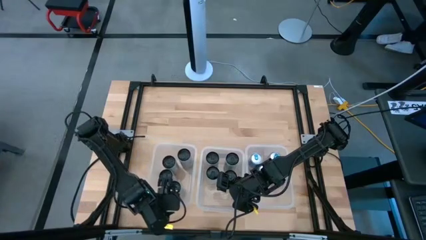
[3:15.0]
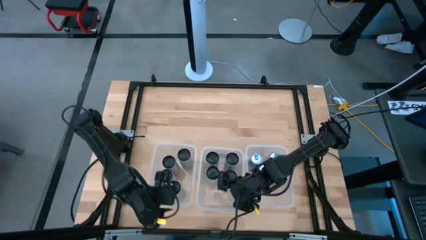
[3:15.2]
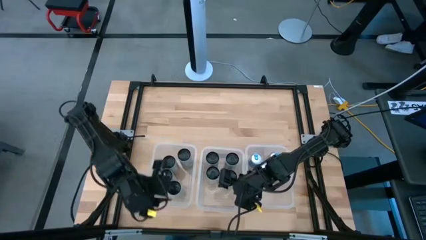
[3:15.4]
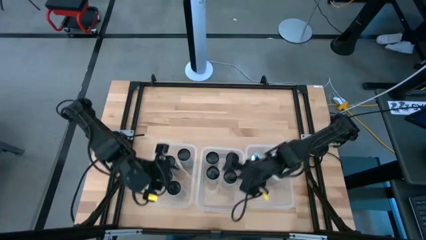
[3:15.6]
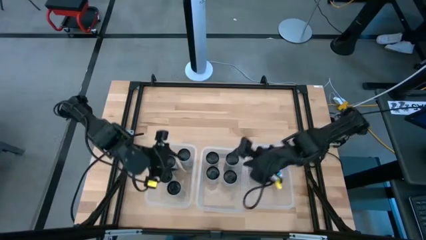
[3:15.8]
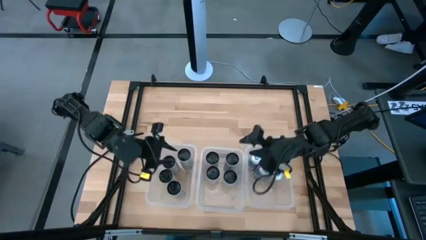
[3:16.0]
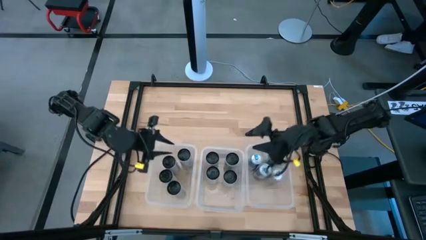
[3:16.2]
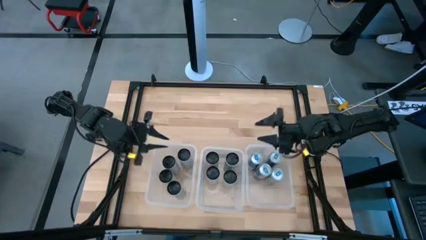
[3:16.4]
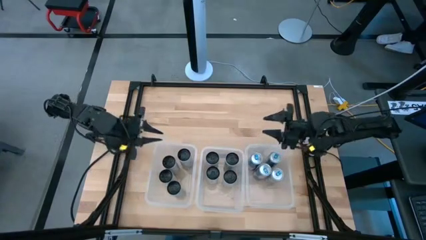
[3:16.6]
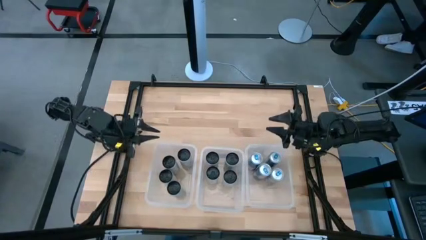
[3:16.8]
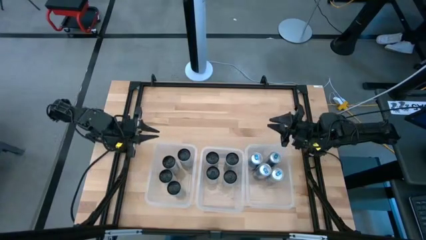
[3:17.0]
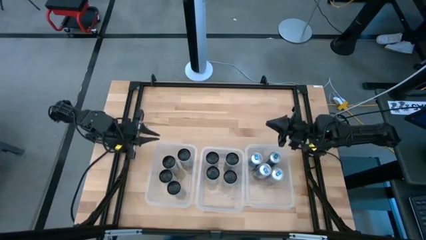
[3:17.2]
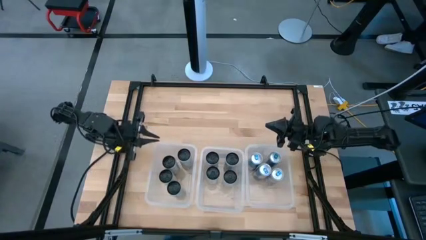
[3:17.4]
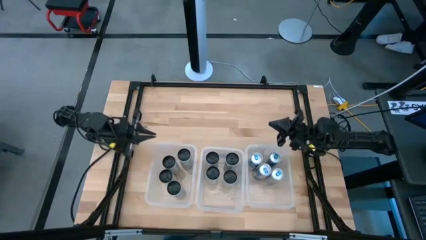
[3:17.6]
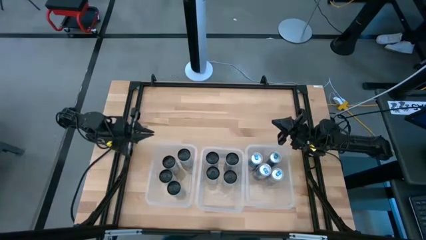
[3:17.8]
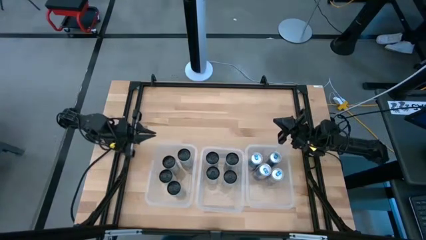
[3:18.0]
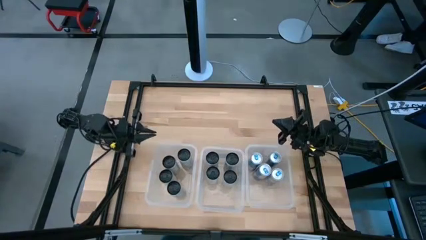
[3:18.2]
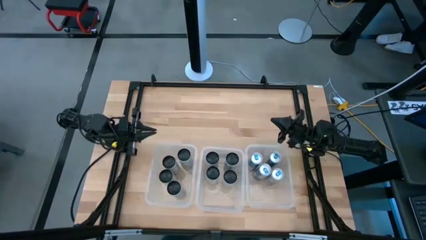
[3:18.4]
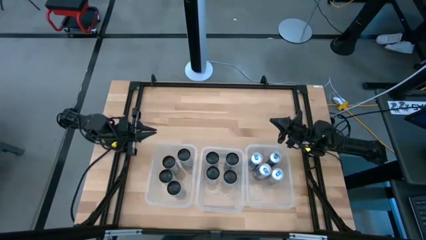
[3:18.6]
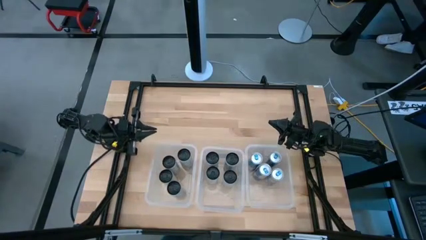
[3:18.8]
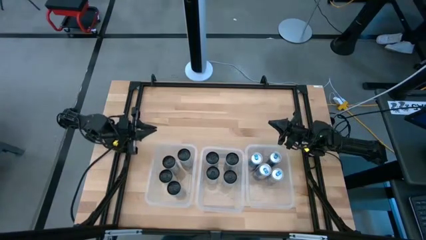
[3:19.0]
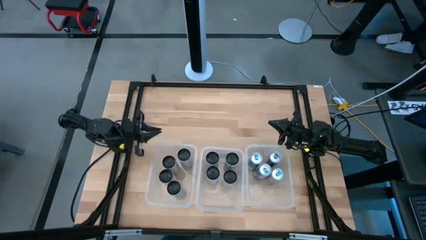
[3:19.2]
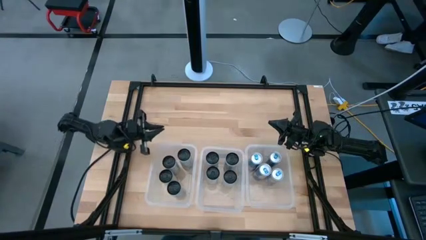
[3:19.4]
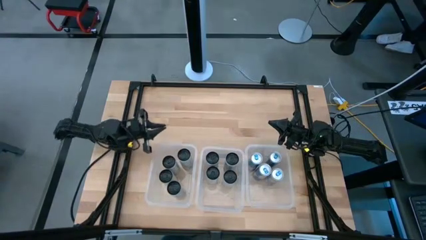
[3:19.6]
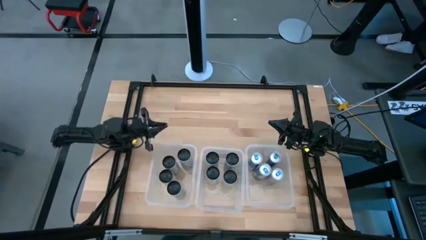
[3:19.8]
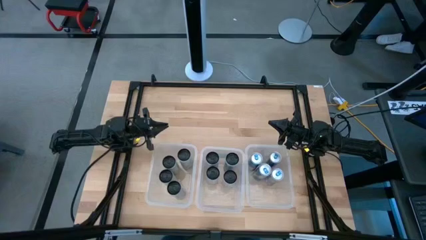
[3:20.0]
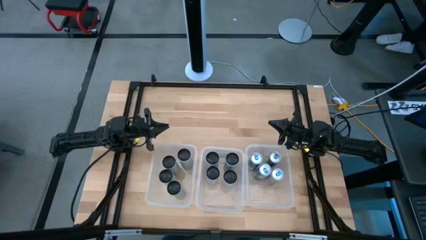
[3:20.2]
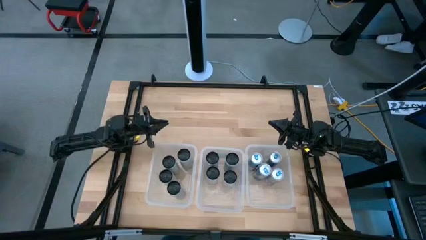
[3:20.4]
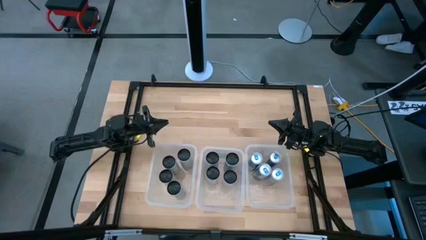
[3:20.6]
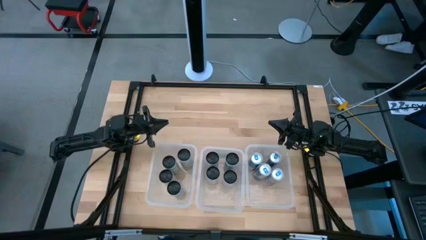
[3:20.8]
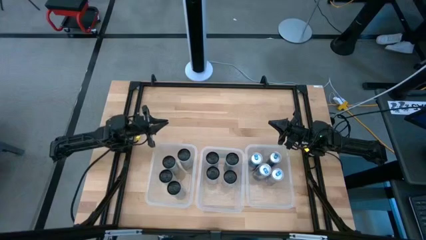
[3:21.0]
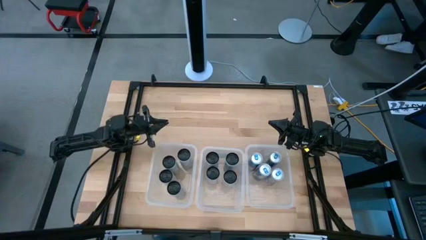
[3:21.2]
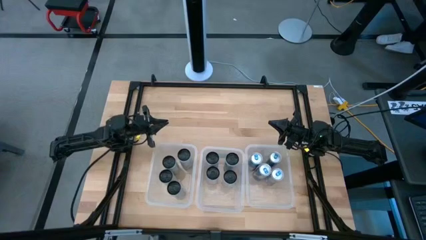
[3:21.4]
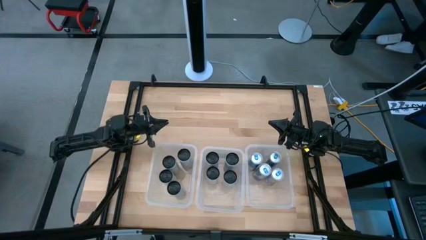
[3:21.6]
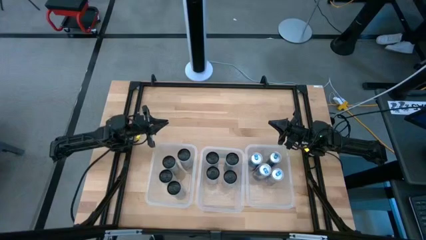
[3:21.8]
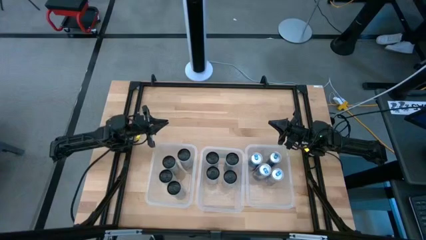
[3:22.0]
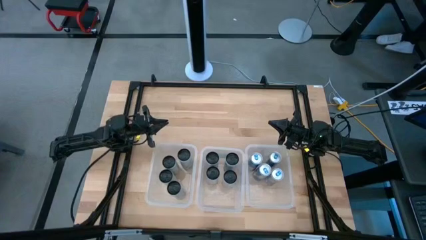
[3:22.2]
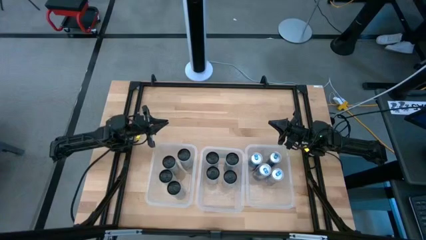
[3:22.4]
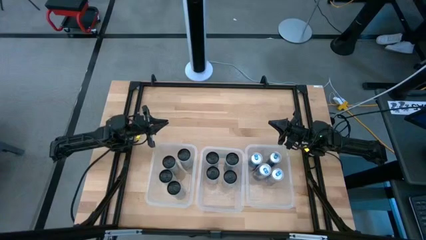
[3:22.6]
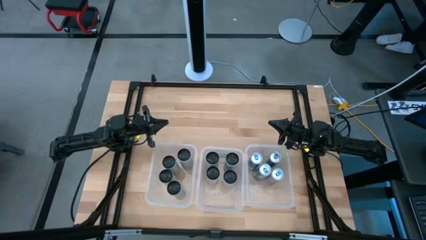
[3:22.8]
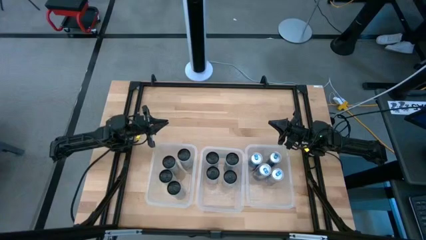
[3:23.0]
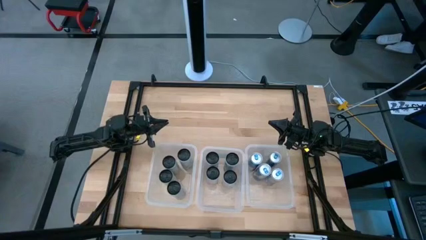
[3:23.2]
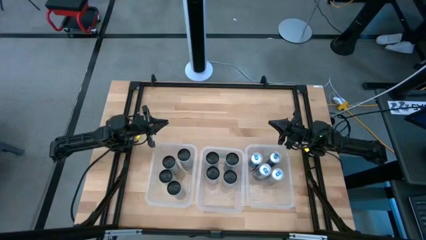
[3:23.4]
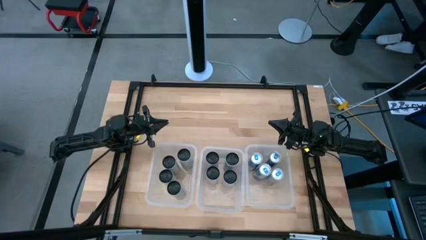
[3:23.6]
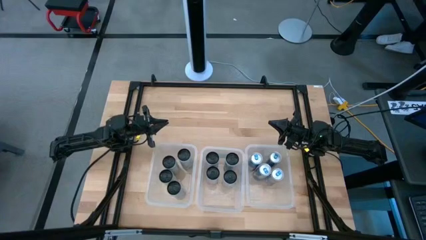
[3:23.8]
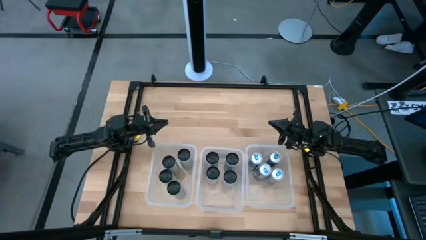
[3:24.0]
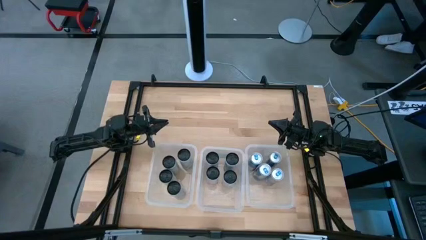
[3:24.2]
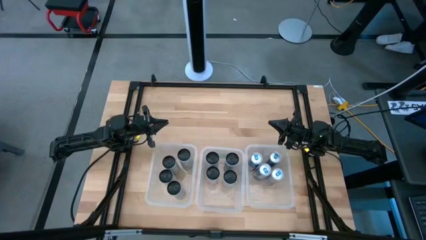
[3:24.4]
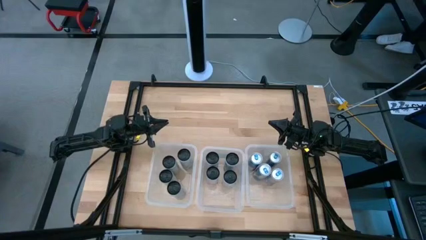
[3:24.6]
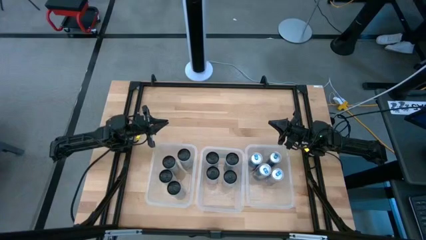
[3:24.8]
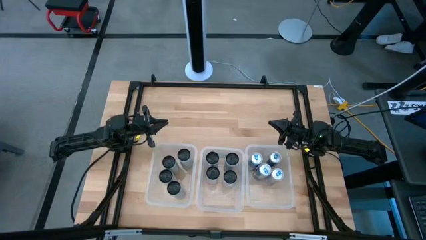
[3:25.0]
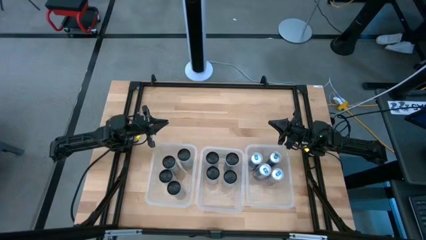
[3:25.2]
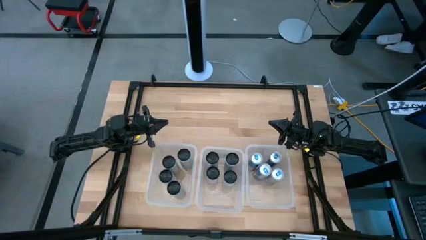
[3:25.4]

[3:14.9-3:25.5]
Task: Sort soda cans
Return to Home Position
